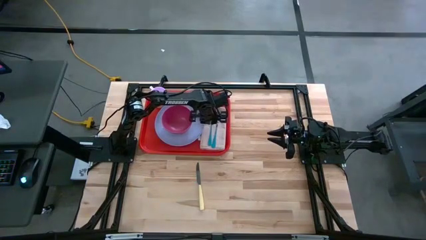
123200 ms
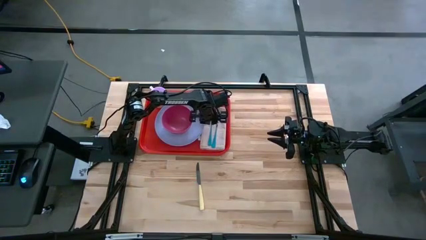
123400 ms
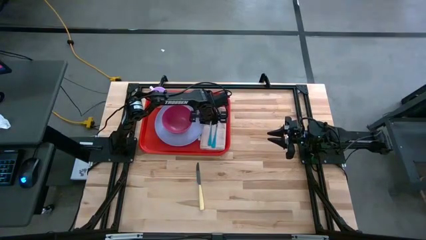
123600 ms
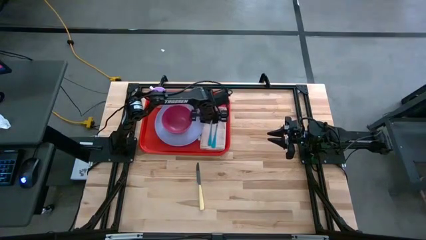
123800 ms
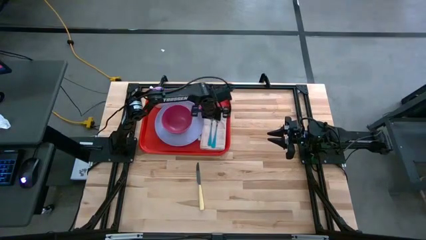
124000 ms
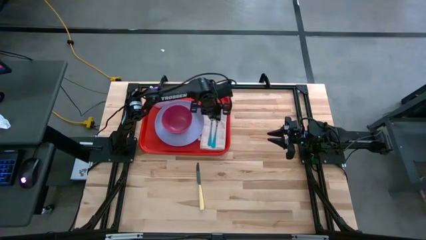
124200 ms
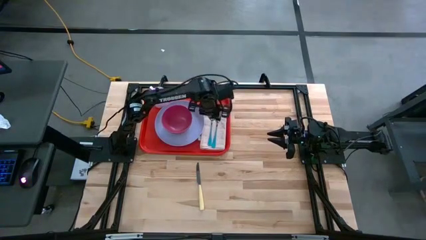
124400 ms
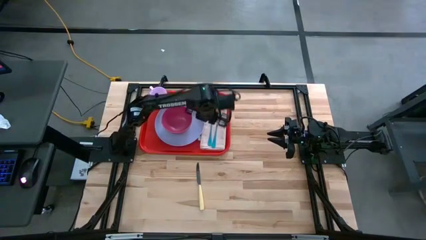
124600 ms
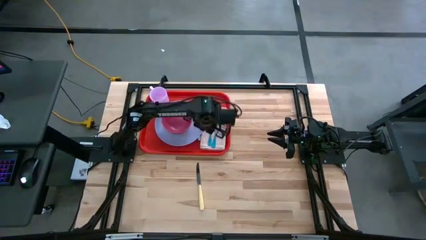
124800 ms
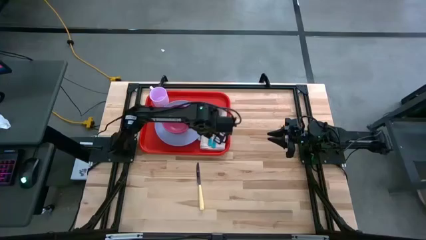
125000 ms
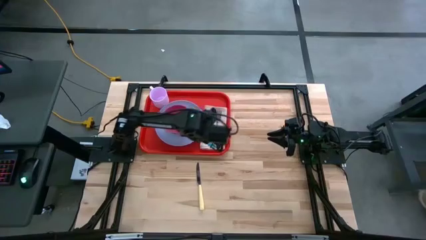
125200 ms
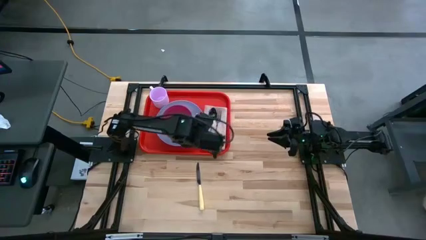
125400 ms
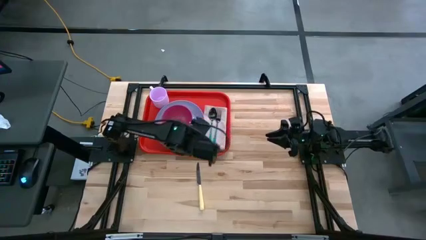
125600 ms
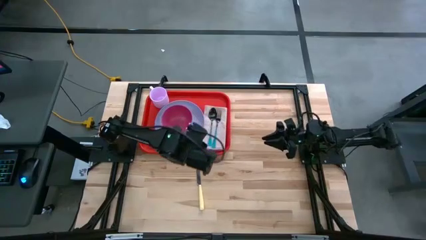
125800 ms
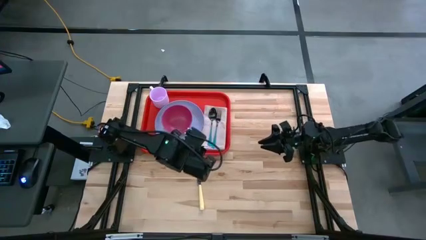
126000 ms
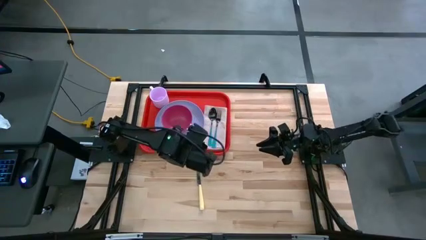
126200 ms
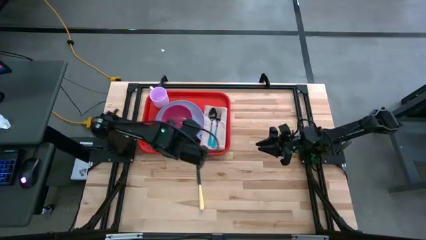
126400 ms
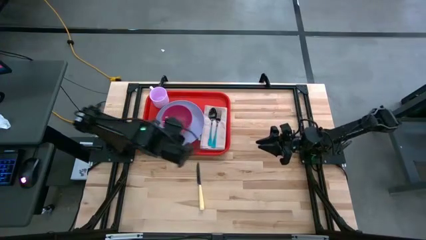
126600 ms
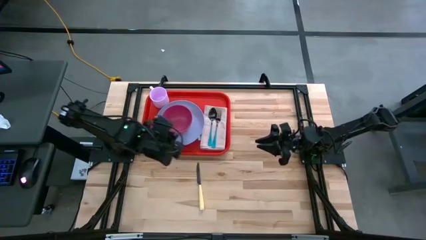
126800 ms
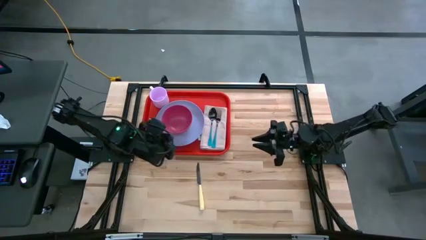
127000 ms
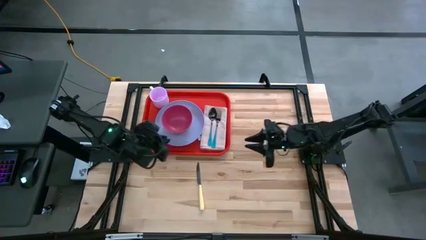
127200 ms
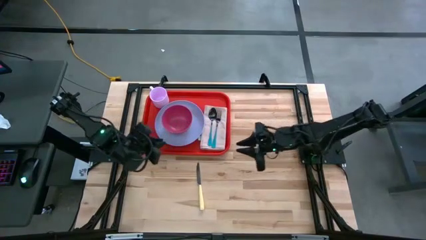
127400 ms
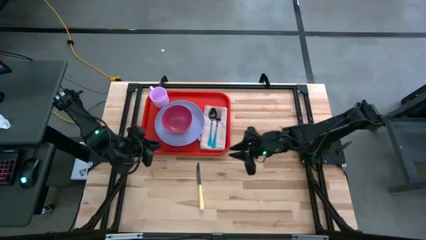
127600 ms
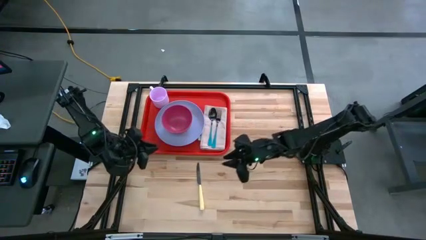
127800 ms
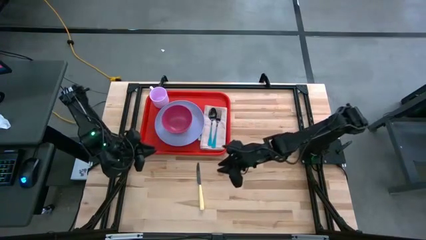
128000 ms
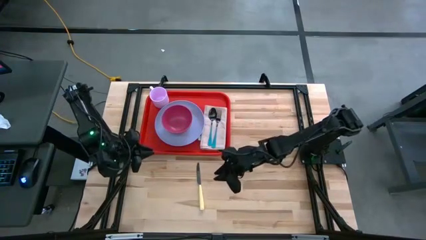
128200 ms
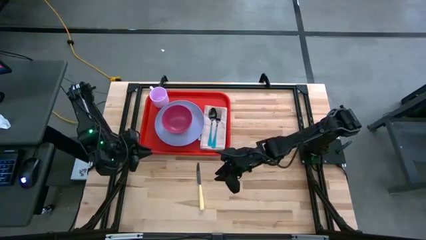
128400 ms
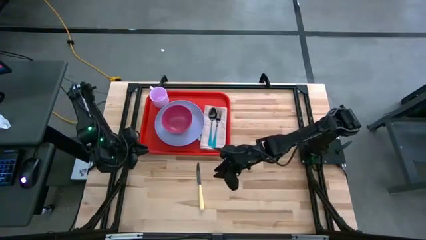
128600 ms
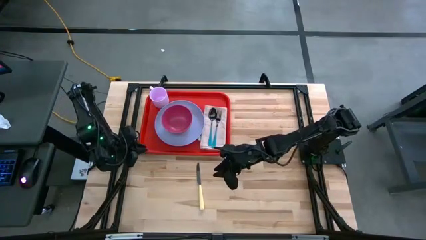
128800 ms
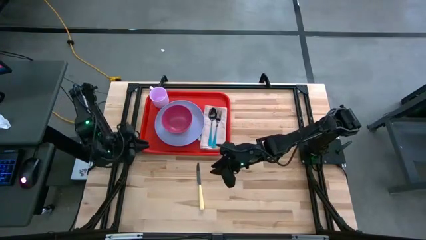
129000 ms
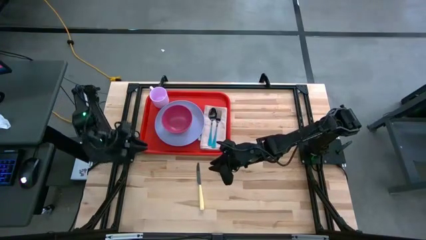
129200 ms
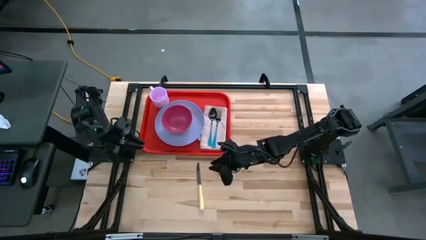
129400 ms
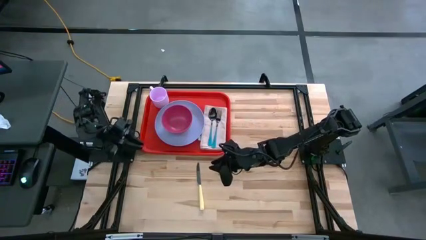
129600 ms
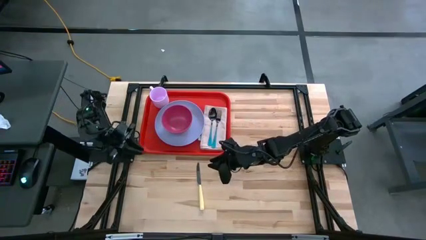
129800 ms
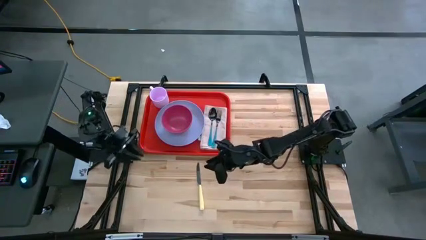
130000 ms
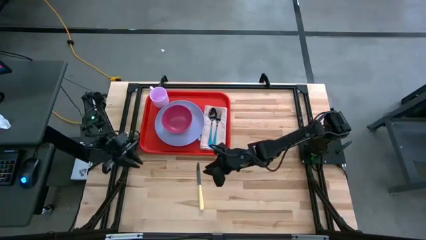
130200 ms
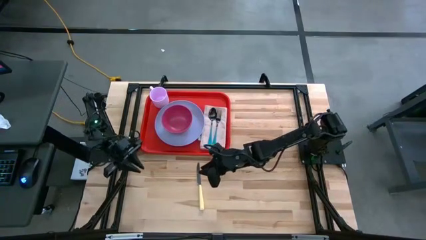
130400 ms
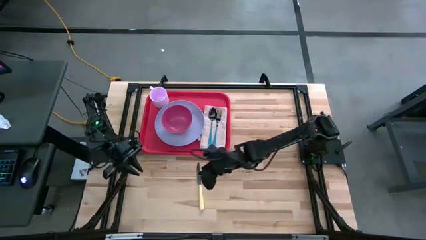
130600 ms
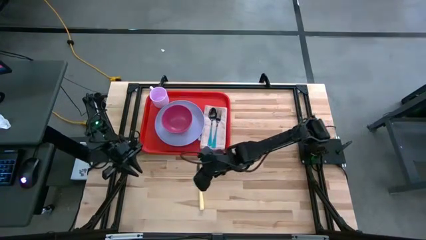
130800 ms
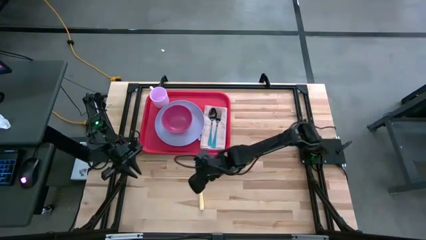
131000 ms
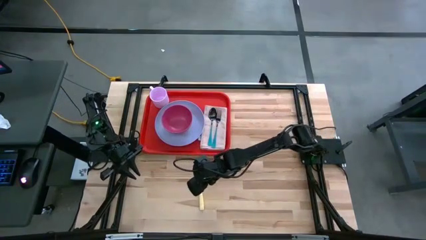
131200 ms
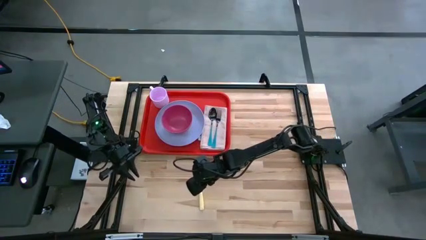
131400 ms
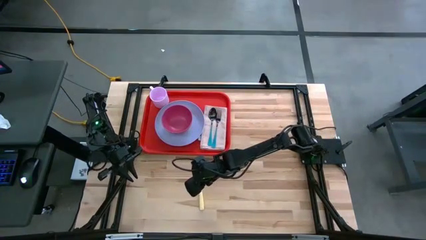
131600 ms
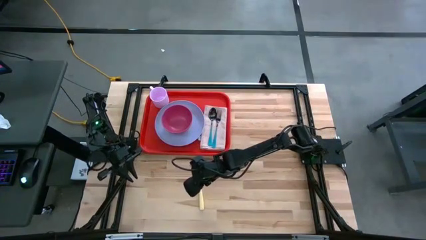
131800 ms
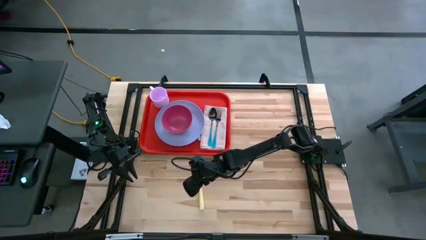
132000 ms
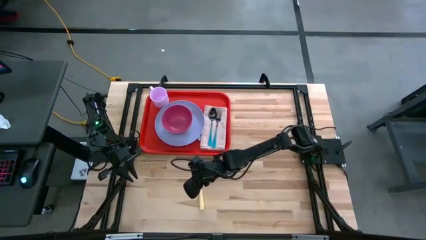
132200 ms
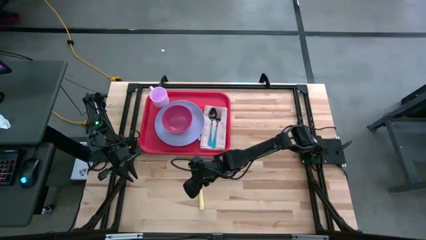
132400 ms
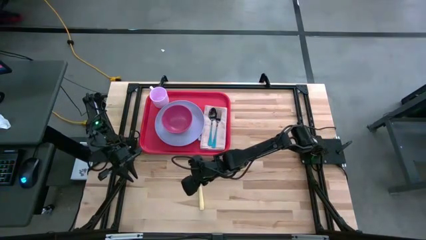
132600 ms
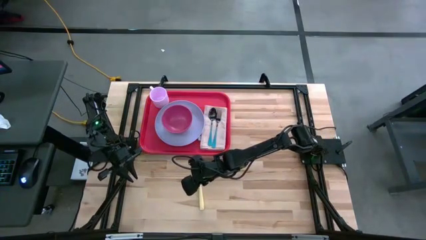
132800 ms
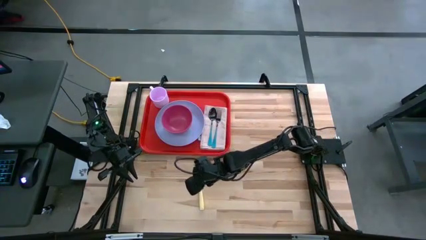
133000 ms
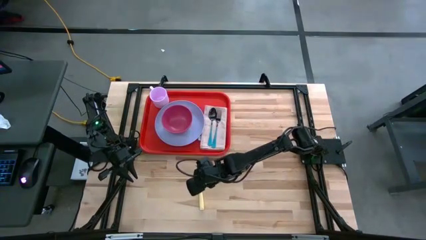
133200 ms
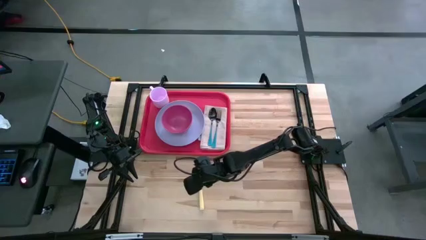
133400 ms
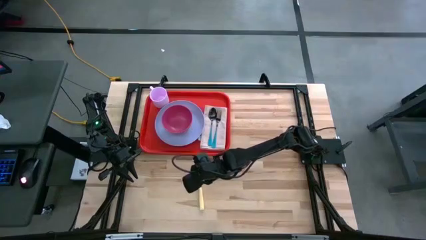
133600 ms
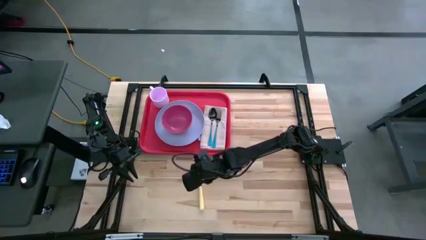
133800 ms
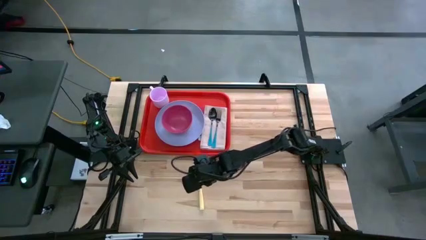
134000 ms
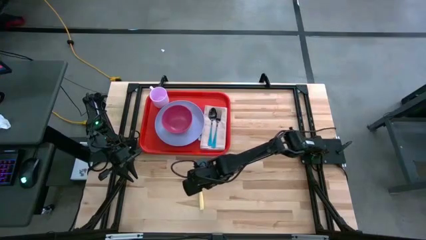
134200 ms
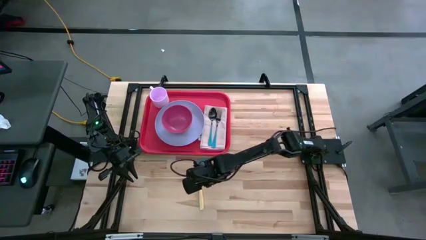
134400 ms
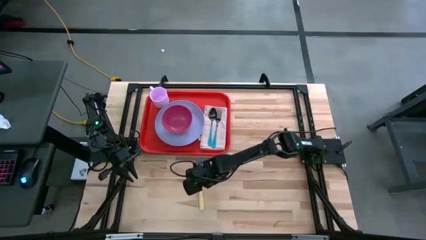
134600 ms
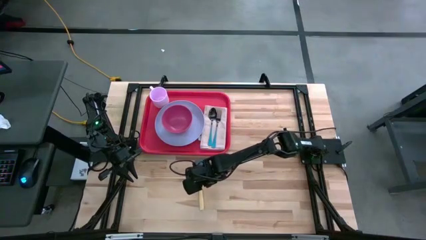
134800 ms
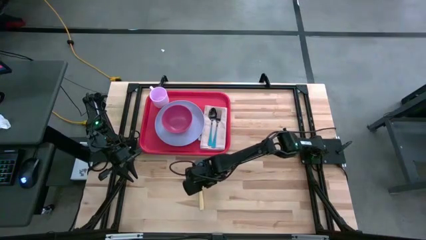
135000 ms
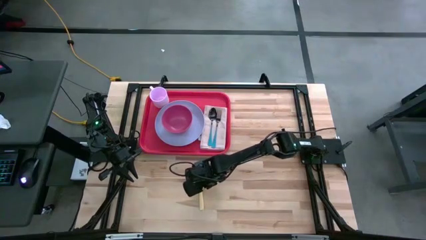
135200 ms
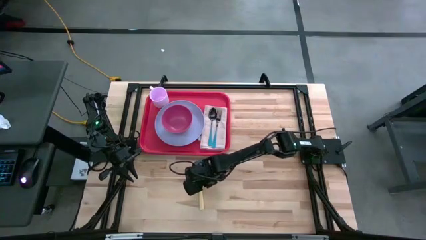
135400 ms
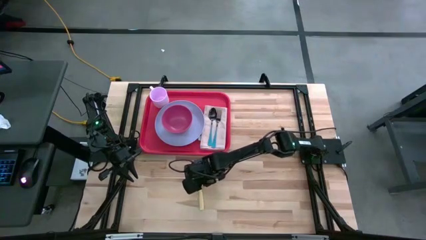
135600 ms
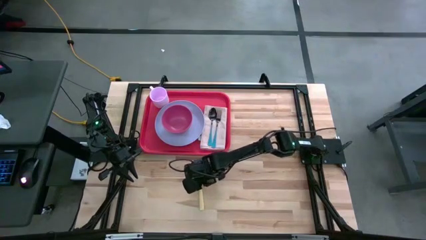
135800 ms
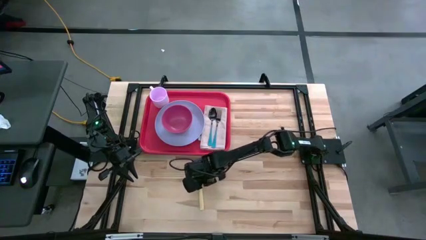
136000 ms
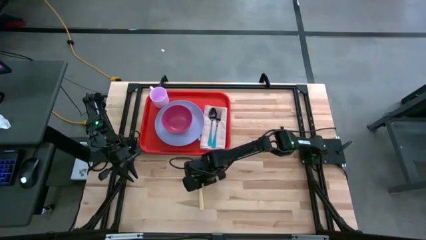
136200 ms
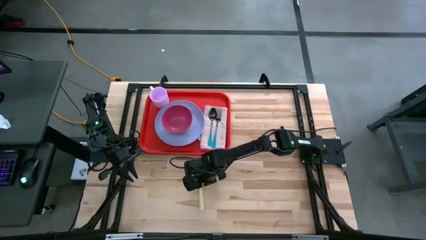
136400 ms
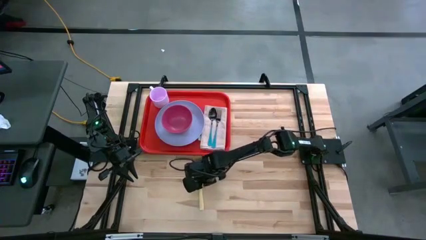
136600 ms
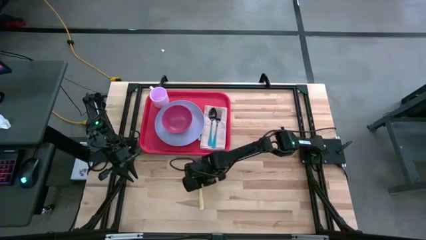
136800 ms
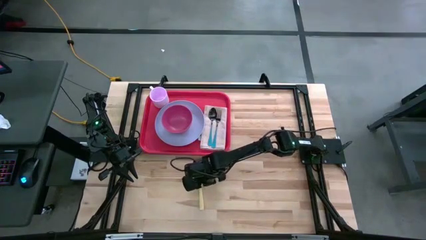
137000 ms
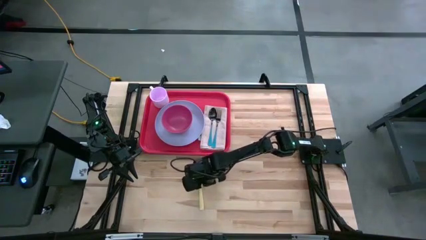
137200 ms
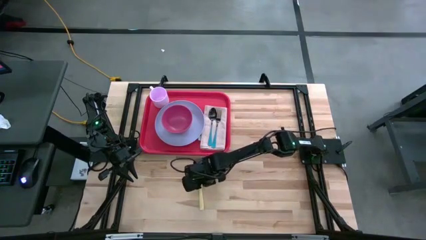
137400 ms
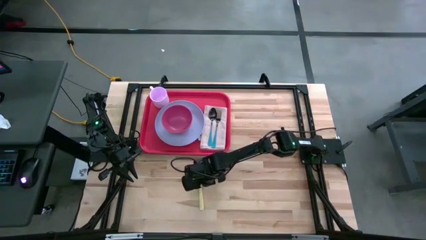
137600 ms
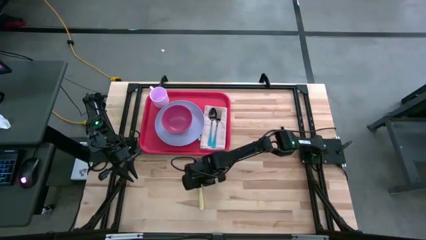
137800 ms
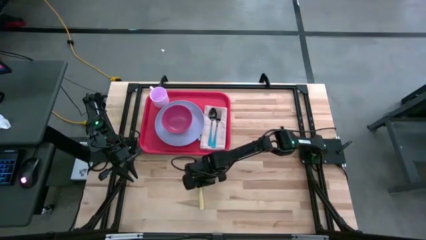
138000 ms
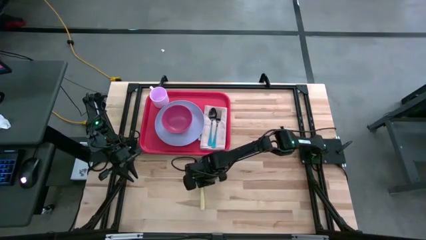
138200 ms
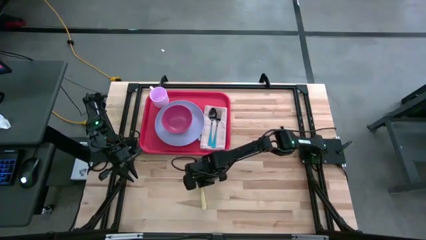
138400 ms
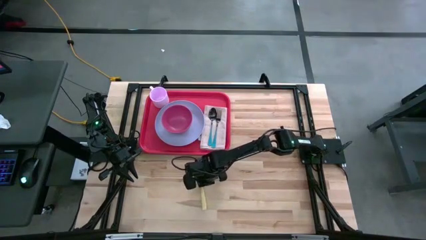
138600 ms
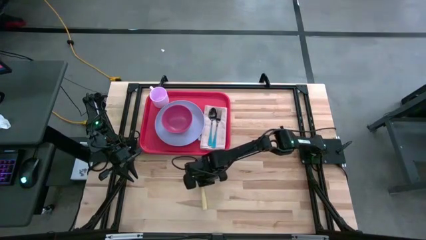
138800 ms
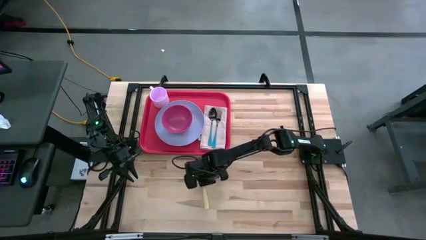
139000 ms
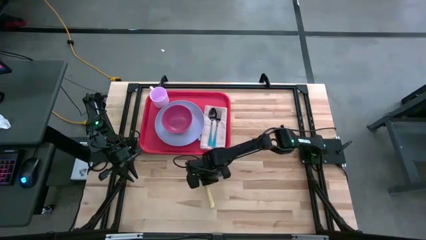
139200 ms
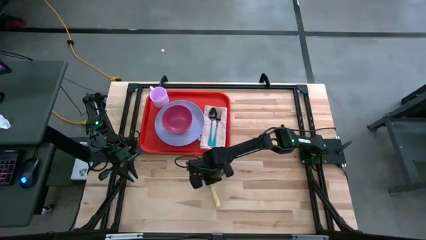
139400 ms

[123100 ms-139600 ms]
Task: Set up tray
Put the yellow knife on top of the brown napkin on the left side of the blue fork on the red tray
